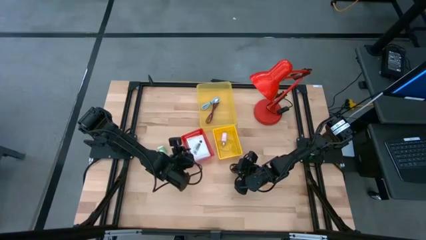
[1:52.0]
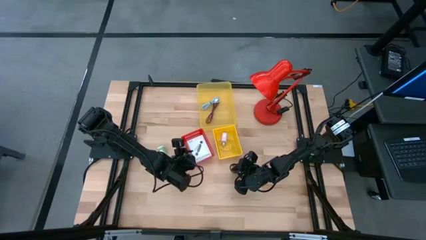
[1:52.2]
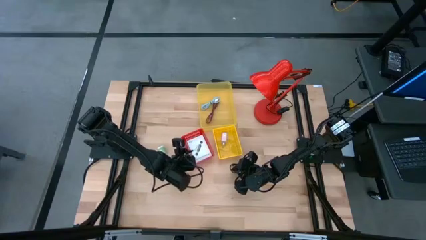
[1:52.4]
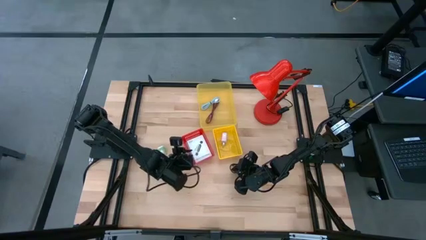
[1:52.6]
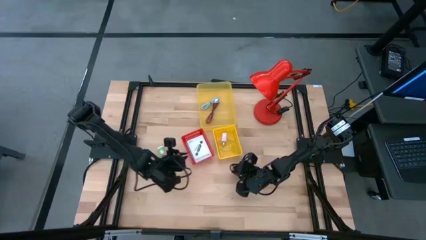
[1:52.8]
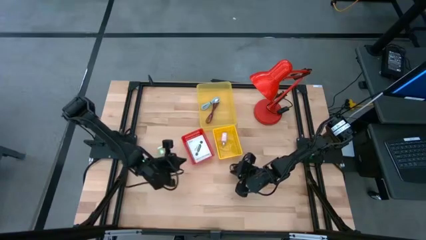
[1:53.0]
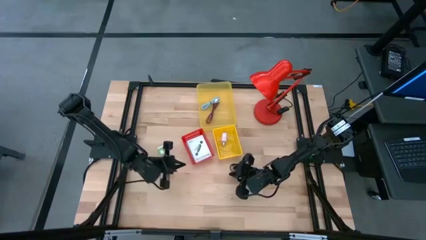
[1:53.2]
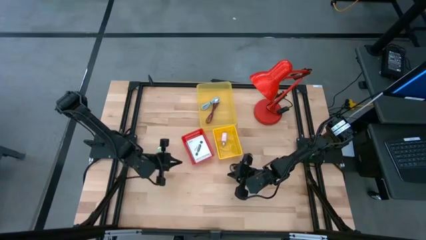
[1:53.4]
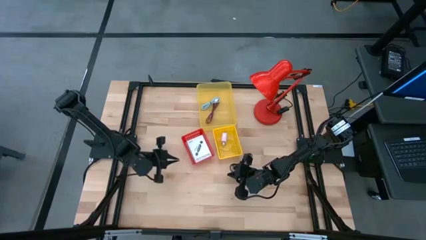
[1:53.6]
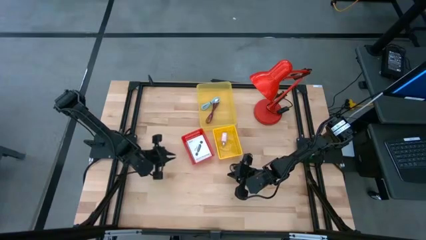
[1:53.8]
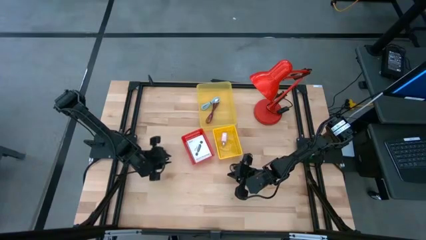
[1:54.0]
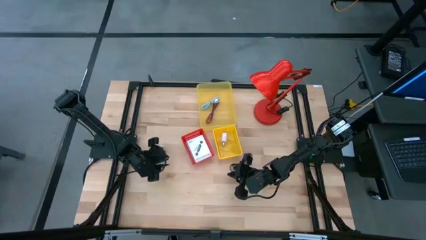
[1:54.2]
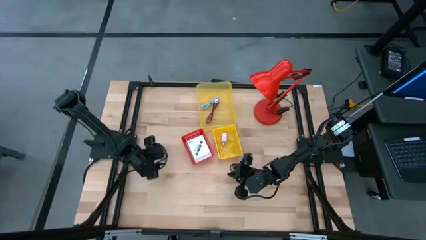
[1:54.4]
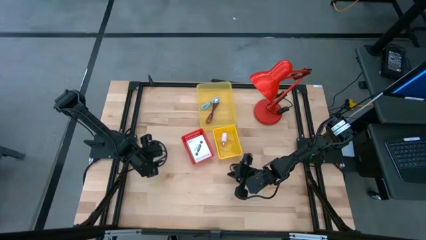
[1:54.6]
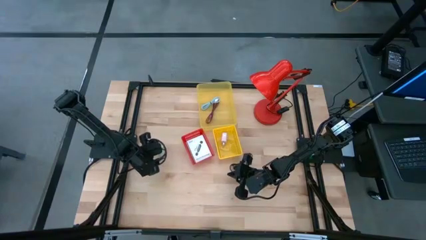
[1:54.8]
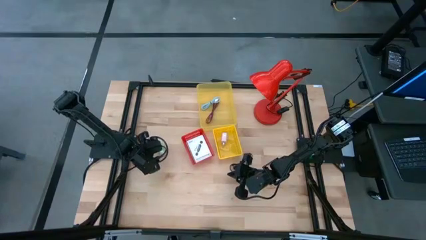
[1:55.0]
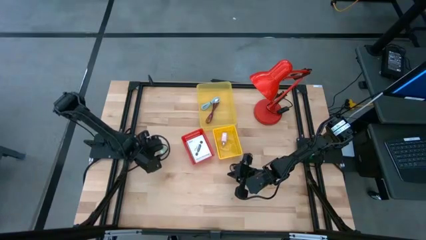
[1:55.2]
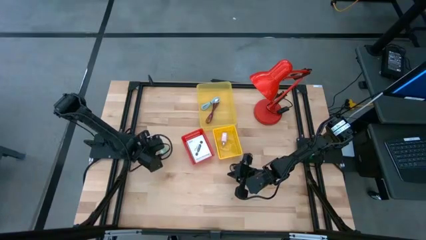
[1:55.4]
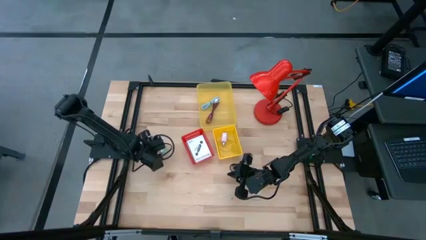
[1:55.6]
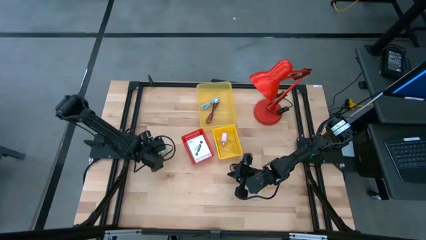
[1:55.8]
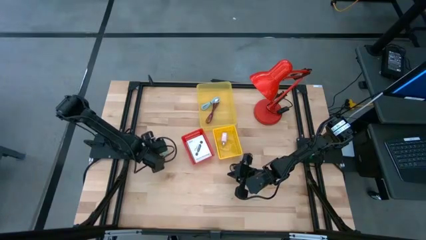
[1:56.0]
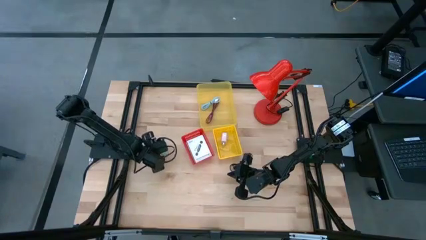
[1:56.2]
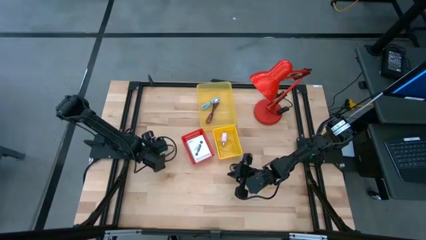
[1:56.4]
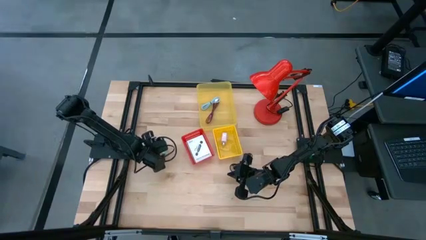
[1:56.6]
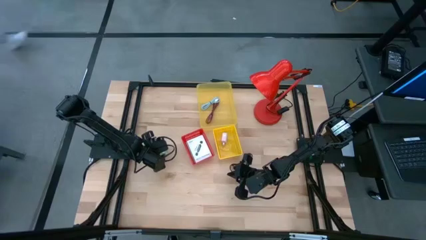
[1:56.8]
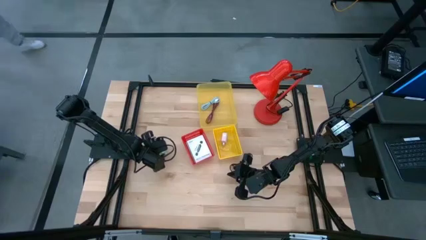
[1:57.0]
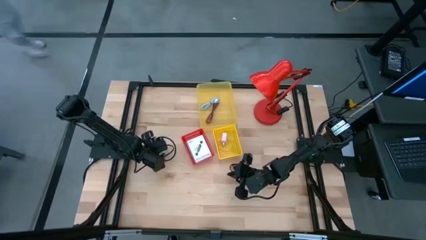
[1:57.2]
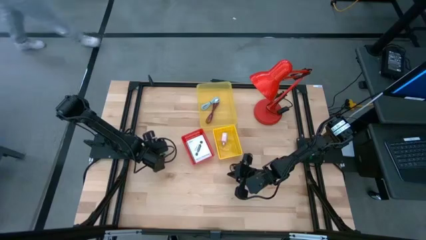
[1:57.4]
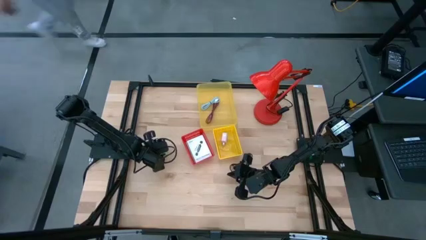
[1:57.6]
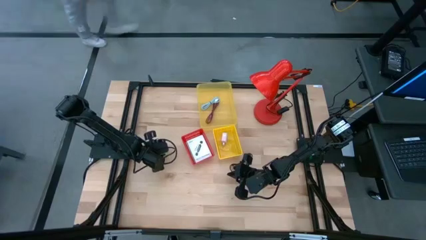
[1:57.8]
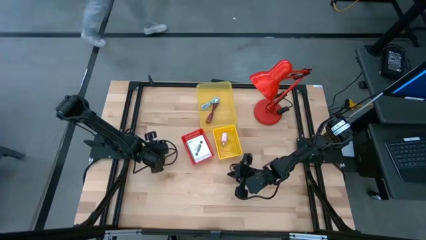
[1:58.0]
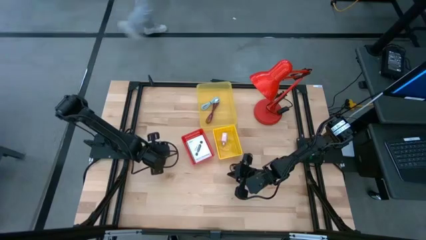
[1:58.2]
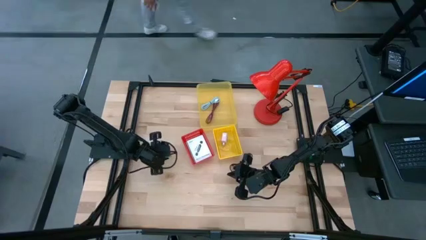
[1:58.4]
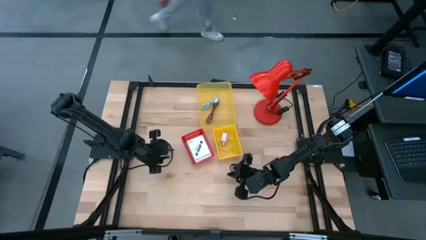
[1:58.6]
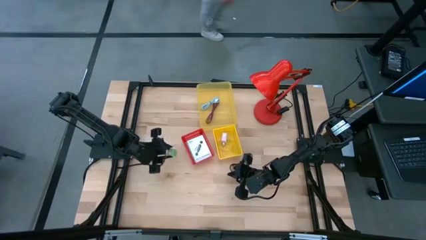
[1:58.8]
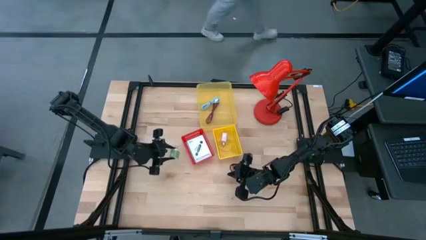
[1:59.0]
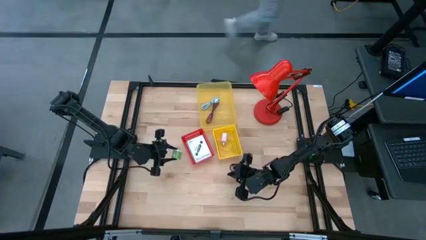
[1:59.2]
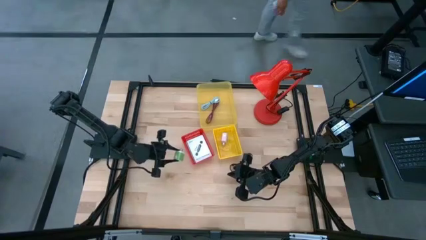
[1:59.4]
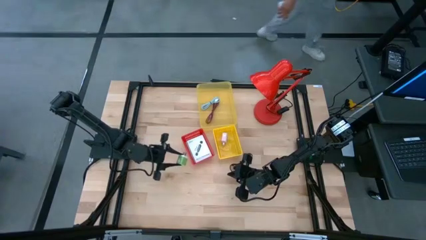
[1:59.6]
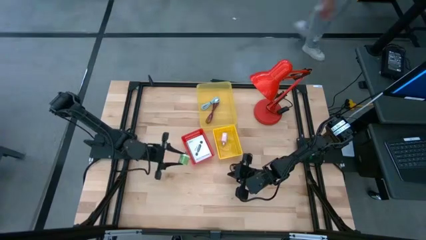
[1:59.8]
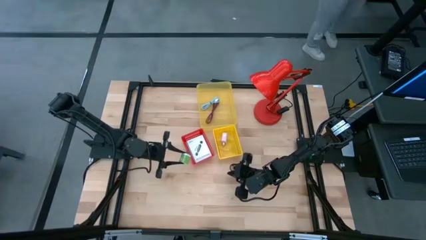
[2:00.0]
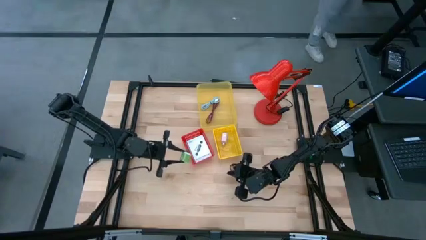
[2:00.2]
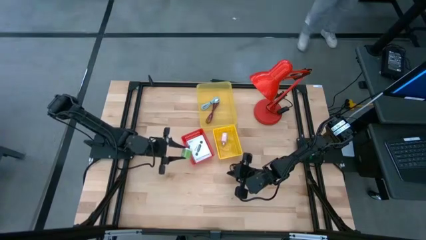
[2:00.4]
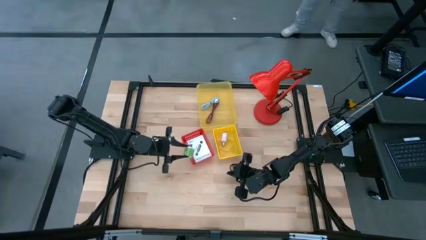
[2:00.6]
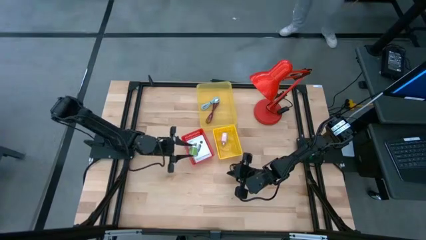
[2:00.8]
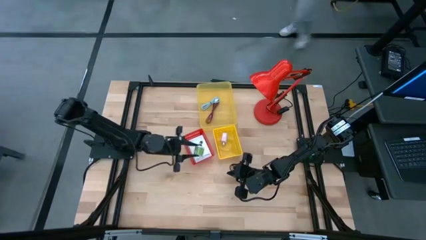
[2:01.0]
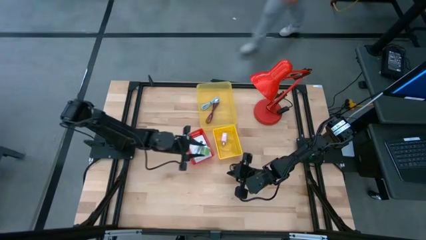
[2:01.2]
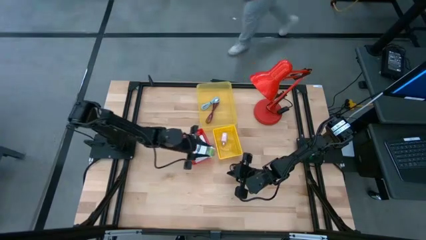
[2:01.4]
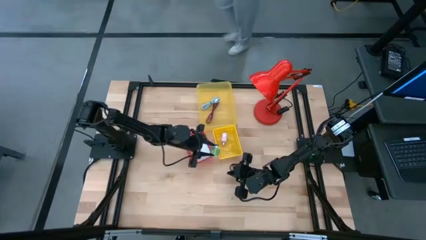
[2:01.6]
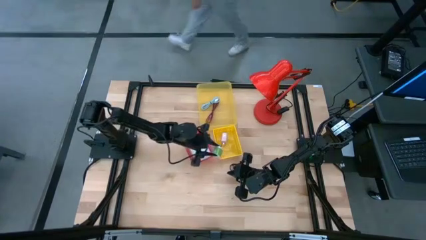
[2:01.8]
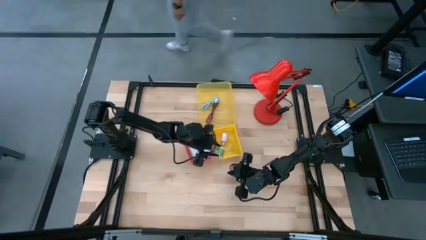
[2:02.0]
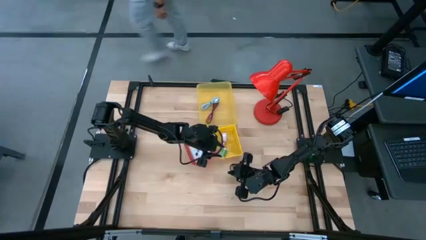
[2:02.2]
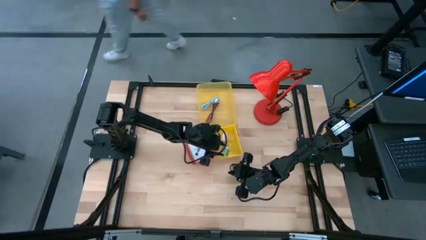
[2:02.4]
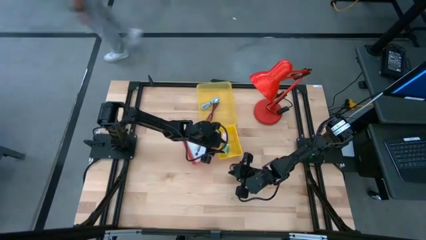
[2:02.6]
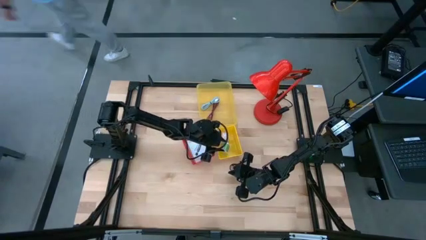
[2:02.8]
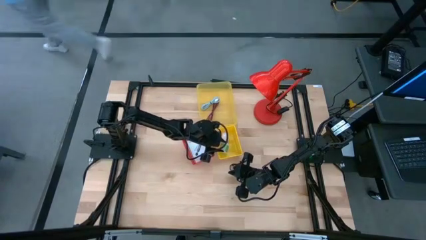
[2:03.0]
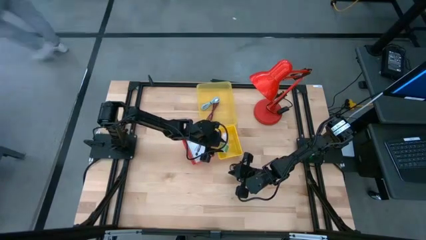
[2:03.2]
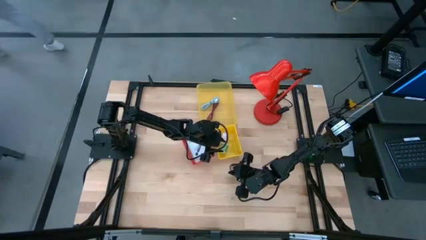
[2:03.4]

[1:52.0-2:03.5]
Task: Pick and place items into bin
Put the green charger adapter into the bottom yellow bin
